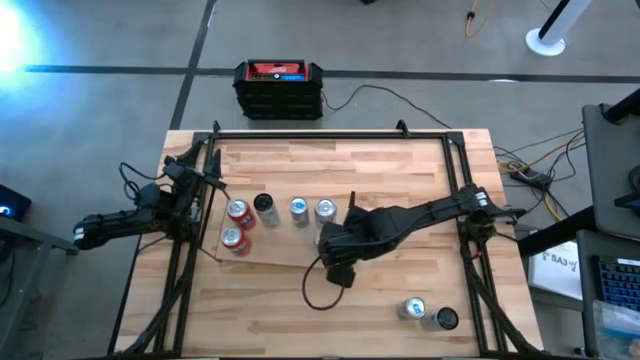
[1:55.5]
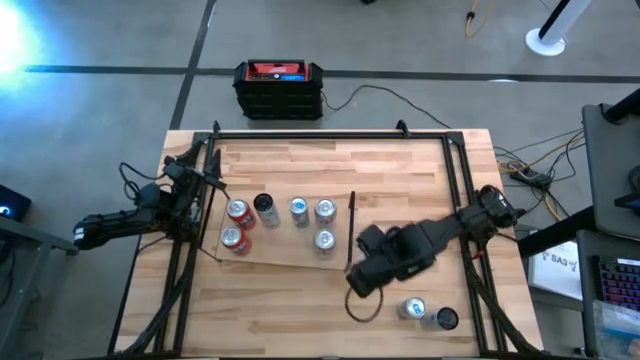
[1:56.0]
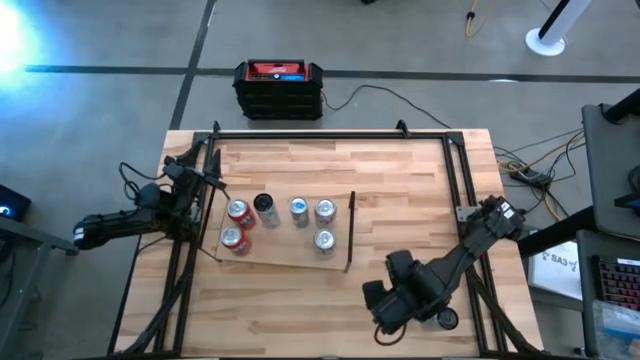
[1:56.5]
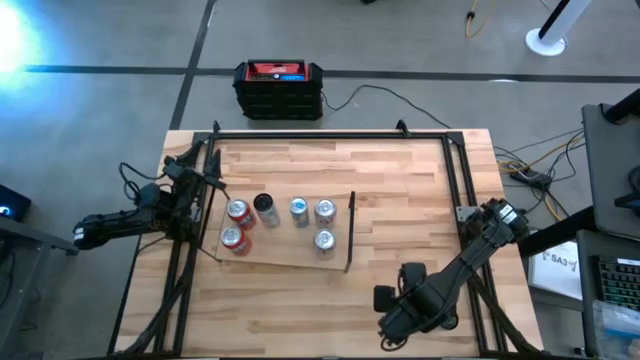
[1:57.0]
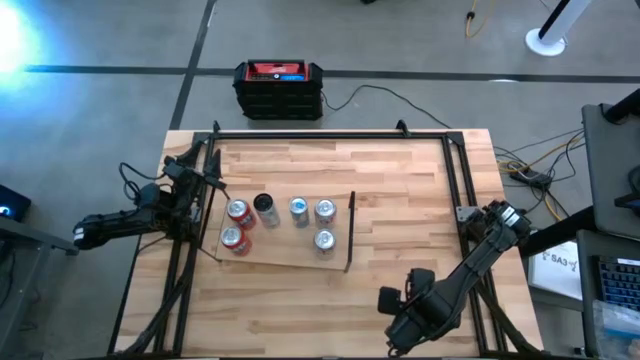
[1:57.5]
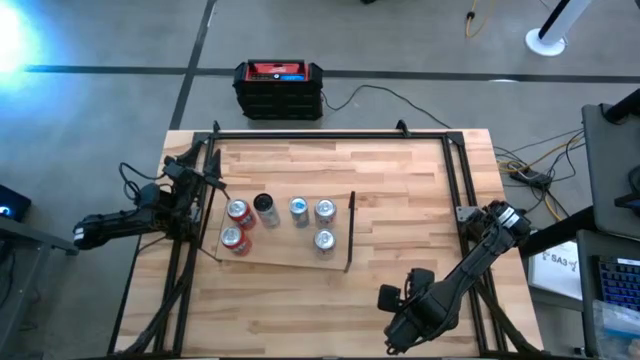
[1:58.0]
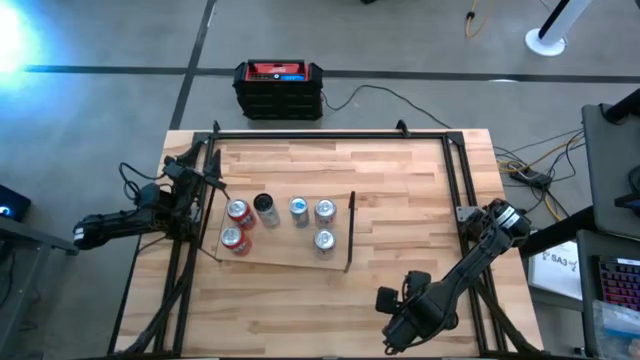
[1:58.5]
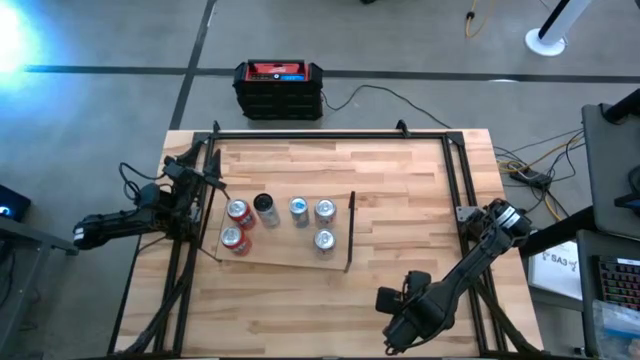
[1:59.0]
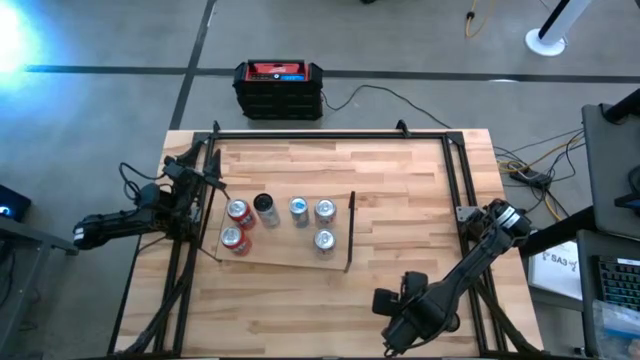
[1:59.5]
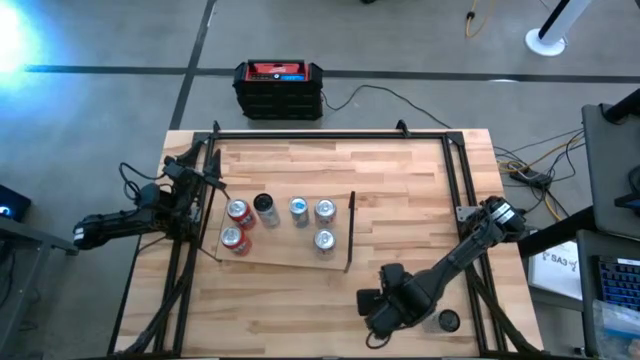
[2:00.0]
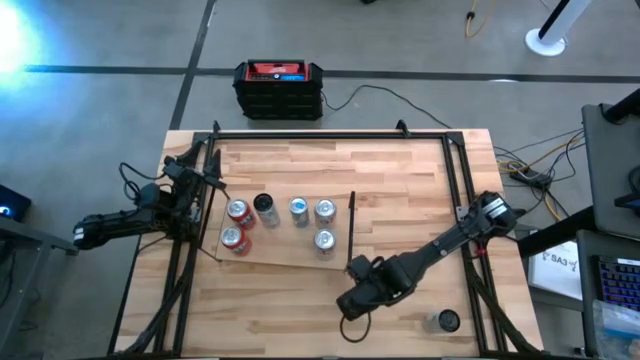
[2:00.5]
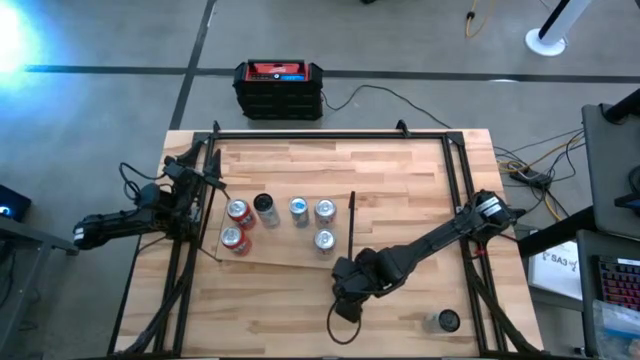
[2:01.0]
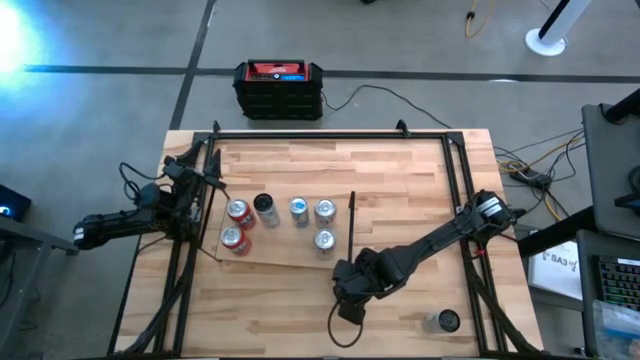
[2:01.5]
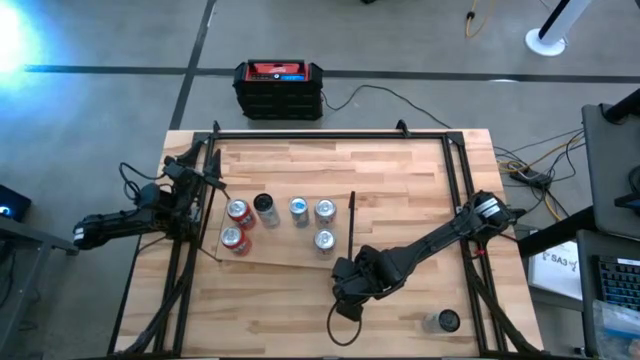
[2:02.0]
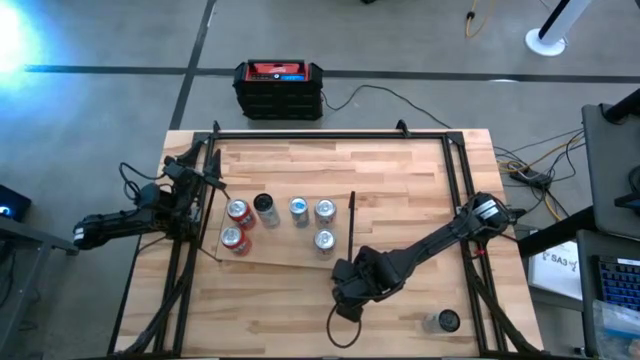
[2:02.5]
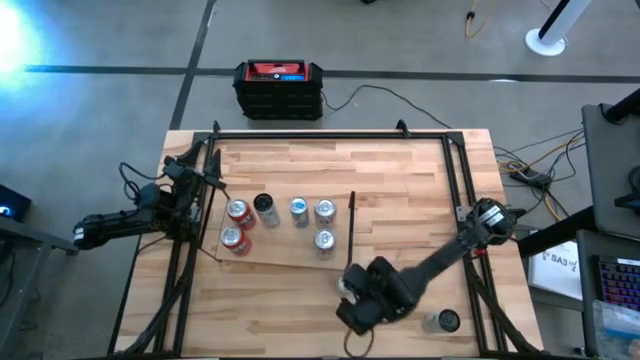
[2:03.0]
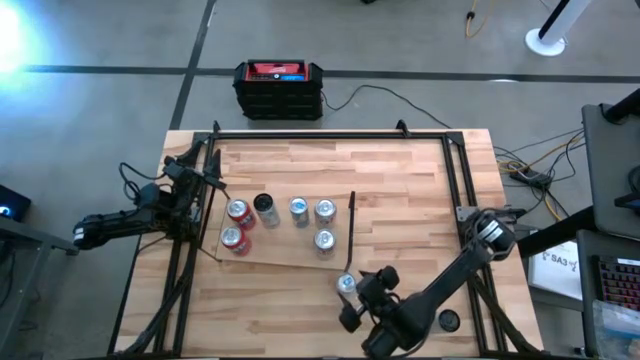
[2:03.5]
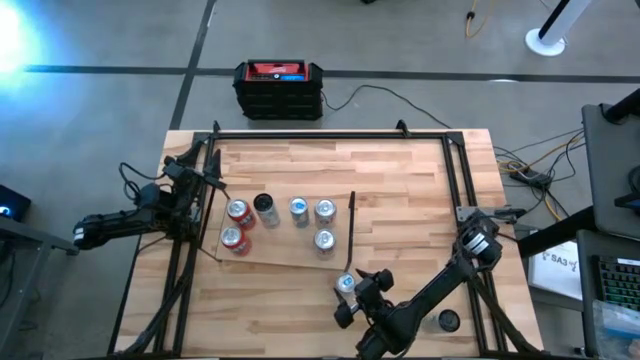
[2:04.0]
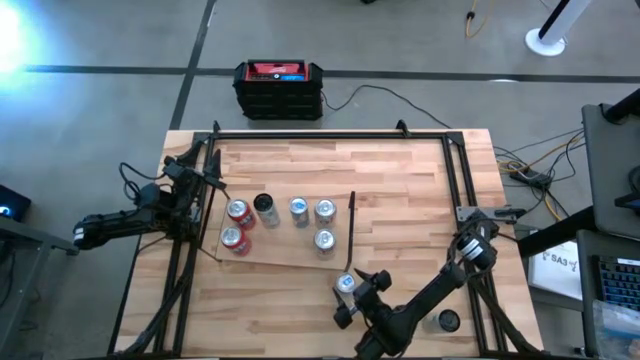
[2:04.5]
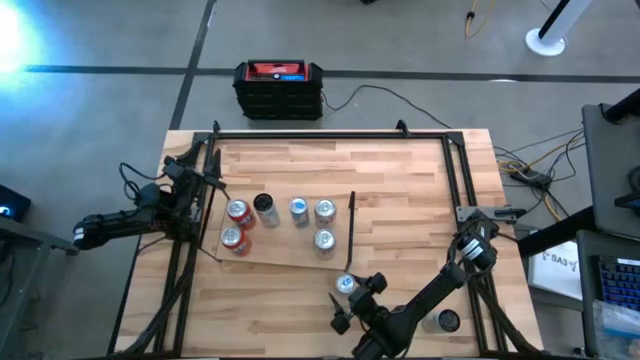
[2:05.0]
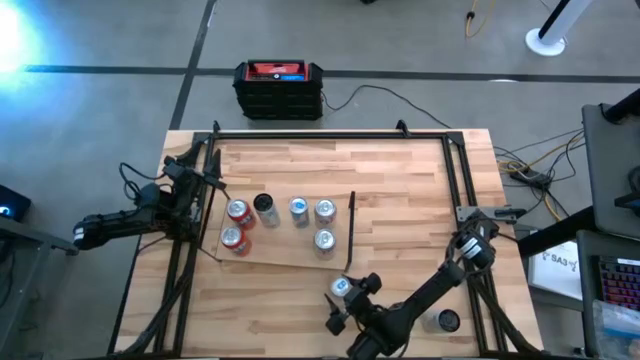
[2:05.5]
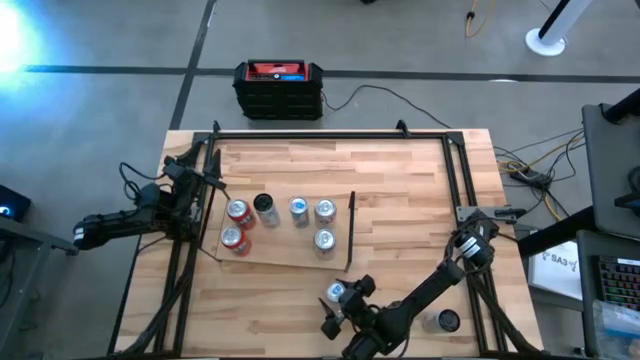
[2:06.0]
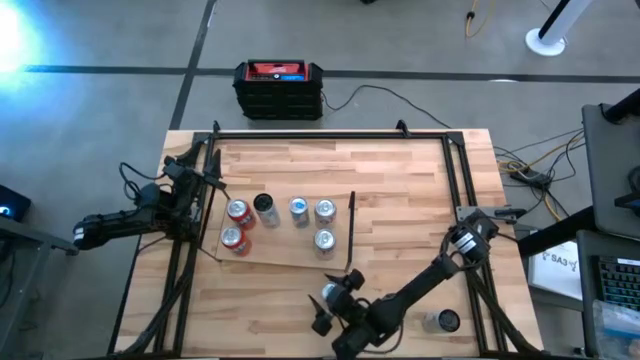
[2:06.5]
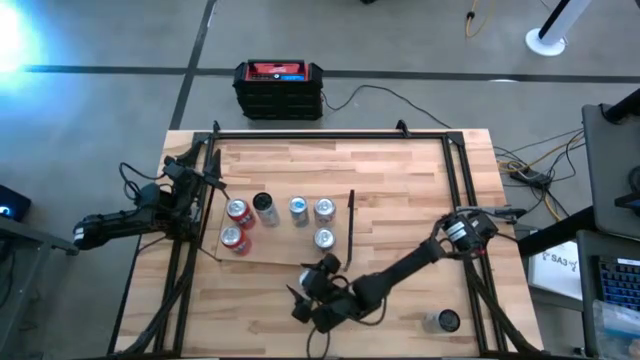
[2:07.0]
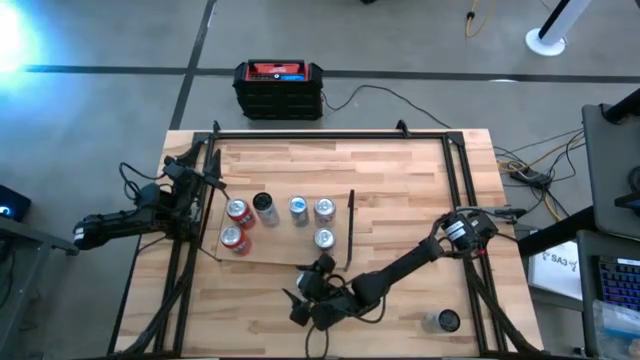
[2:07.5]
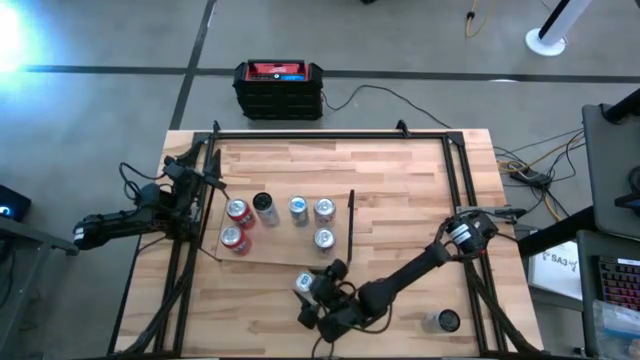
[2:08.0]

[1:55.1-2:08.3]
Task: Place canned beverage on shelf
Move the blue soda can to the bottom middle of the table

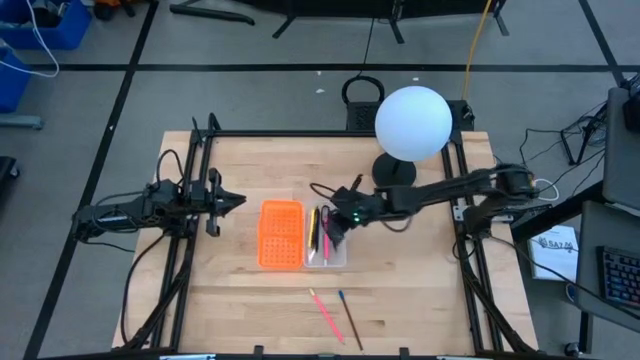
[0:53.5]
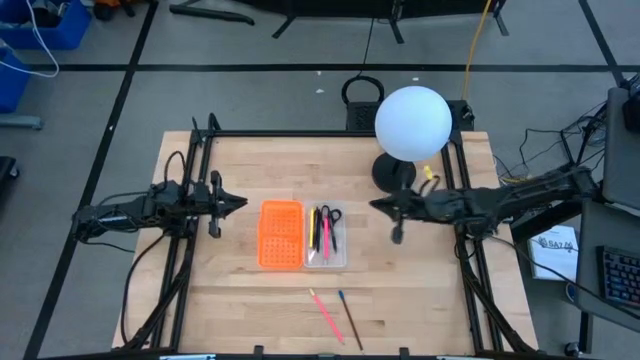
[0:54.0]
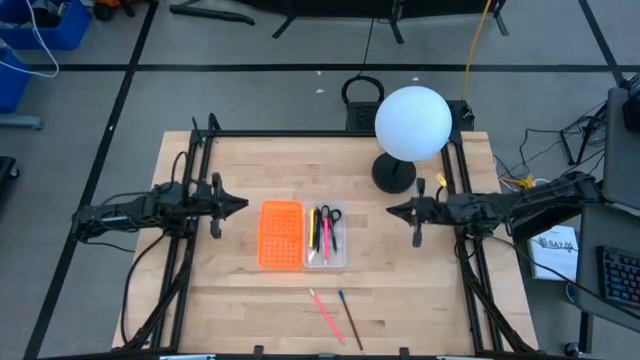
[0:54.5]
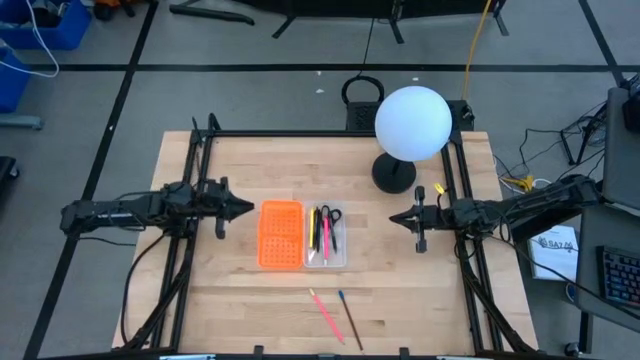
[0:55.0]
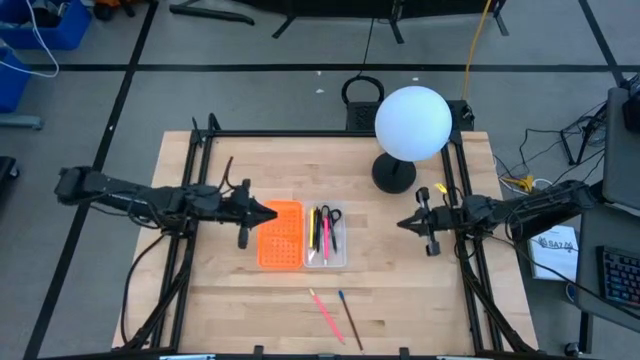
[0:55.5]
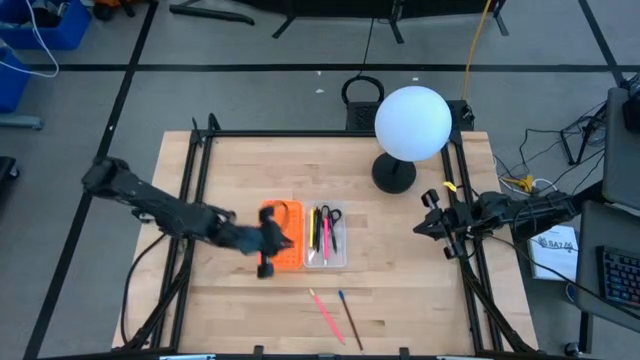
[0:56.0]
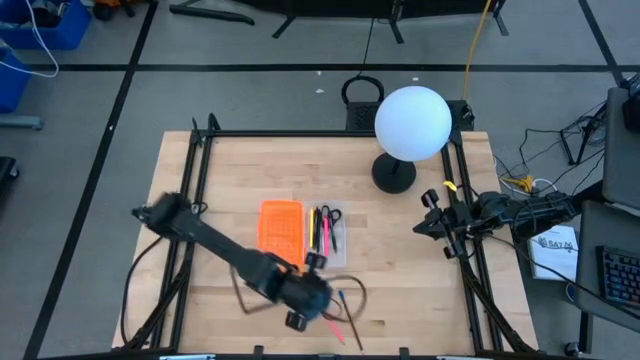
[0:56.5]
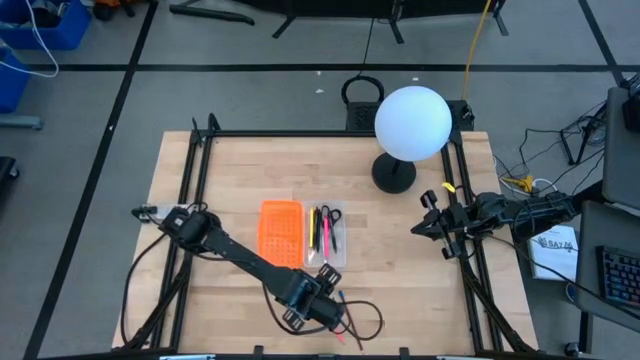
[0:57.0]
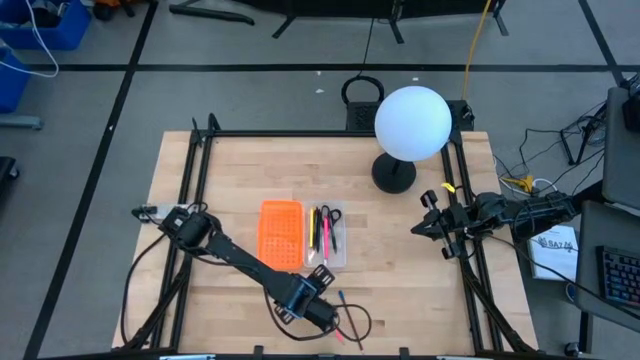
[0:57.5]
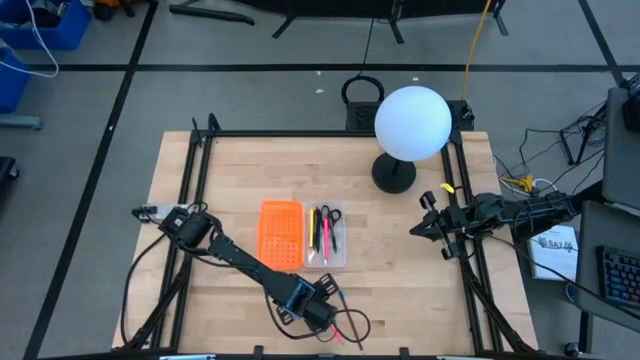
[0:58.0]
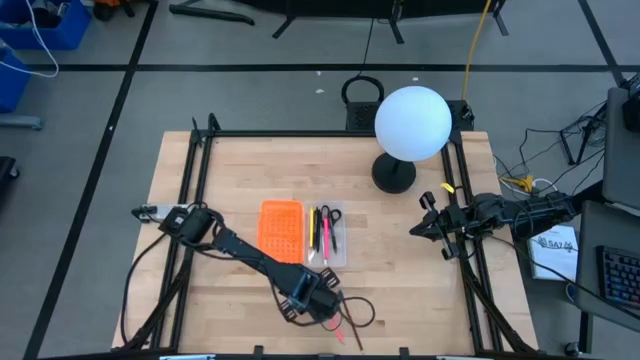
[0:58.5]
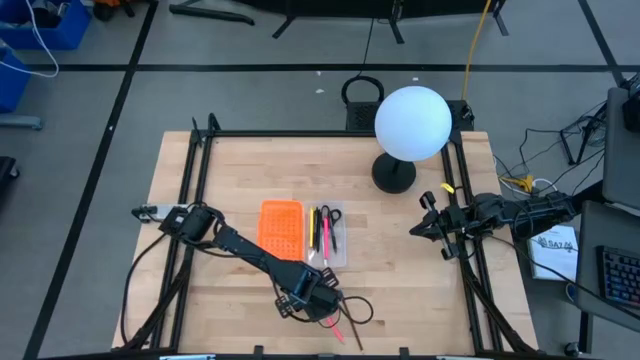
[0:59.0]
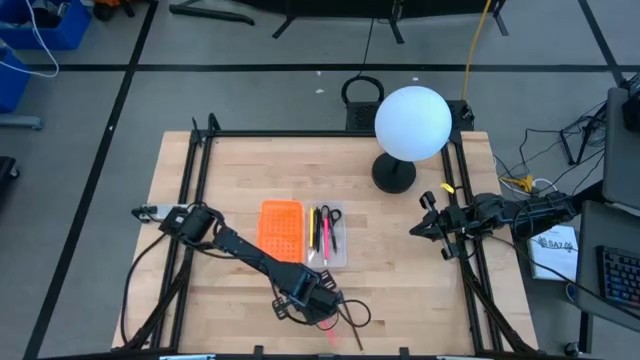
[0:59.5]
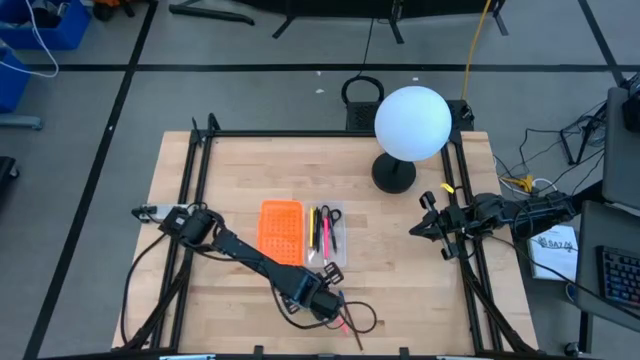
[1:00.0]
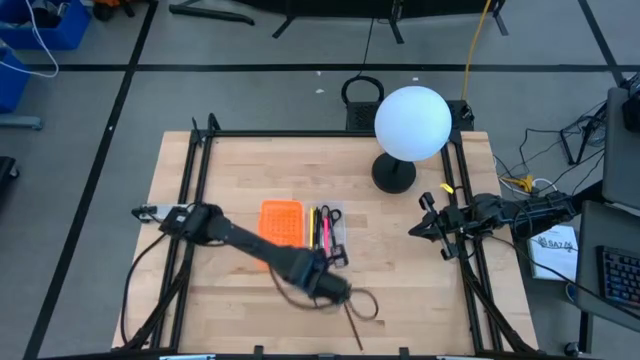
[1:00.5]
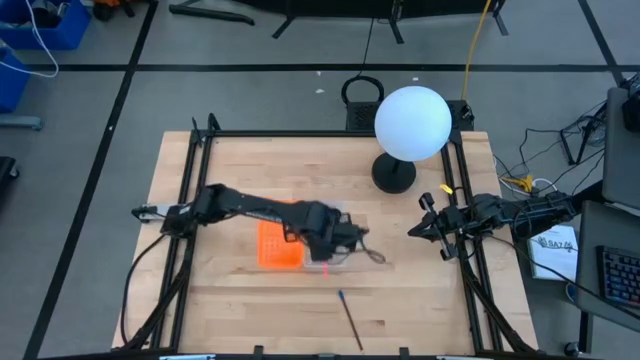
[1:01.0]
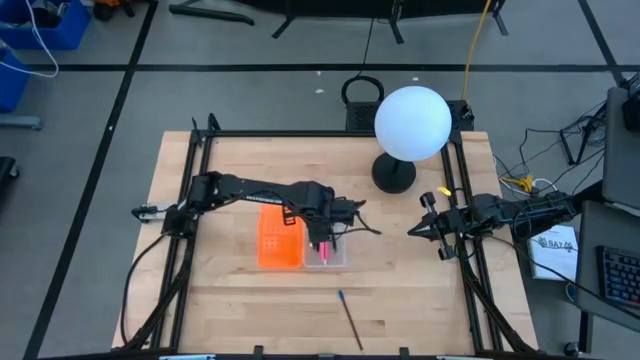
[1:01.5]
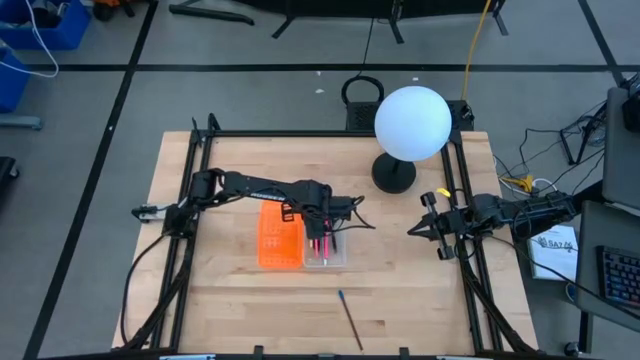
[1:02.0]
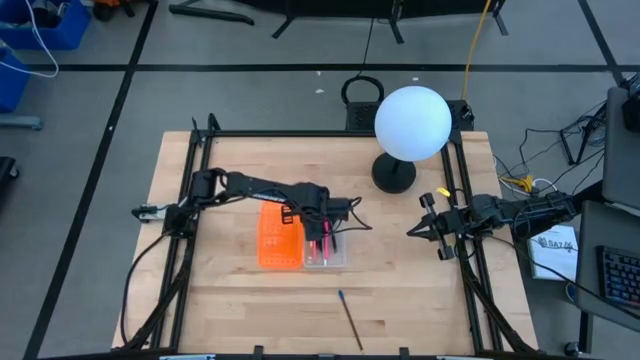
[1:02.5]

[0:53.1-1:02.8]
Task: Pick & place school supplies into a supply box
Put the pink pencil into the orange supply box
